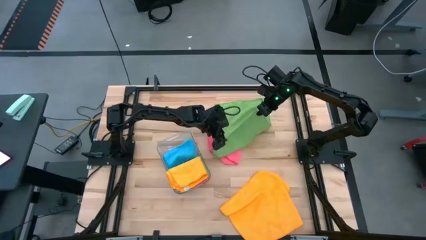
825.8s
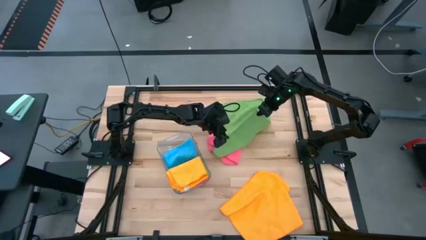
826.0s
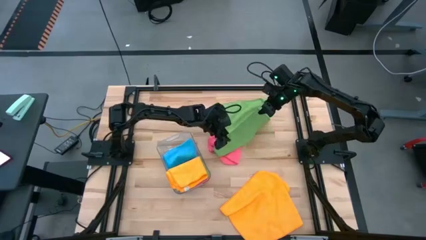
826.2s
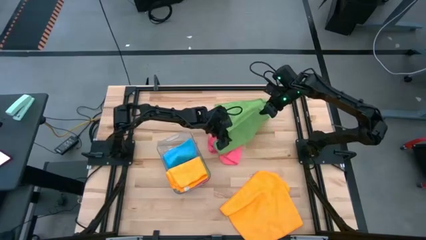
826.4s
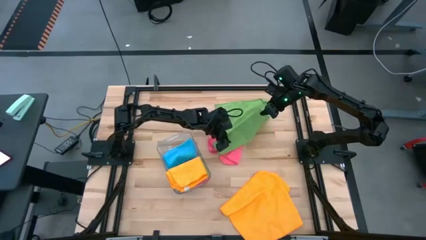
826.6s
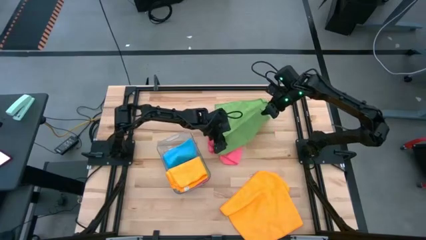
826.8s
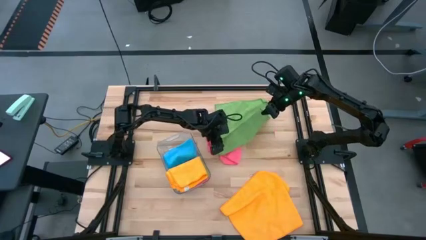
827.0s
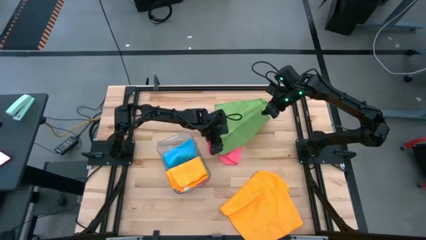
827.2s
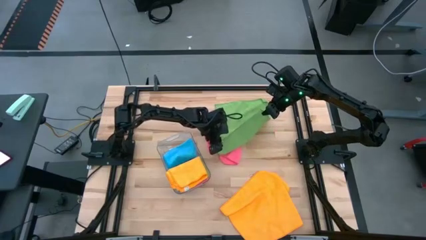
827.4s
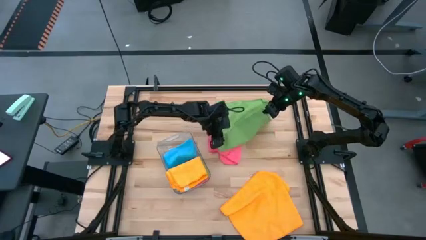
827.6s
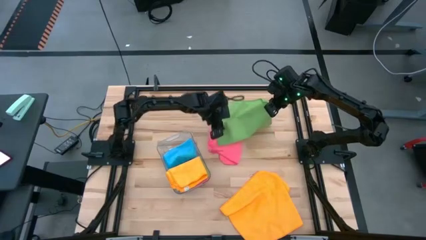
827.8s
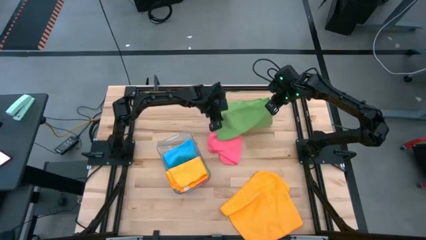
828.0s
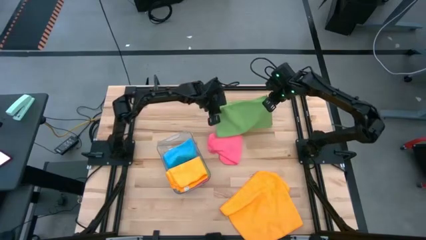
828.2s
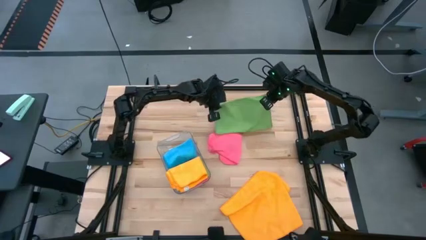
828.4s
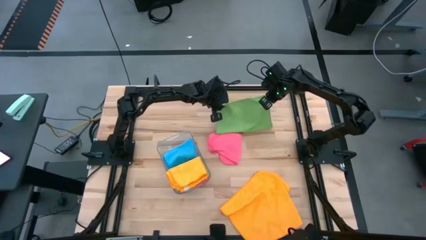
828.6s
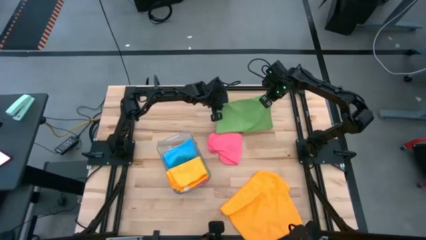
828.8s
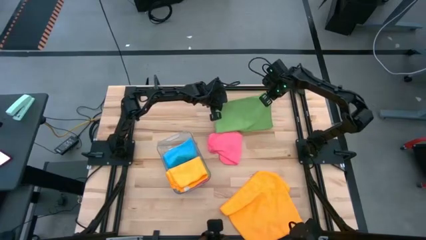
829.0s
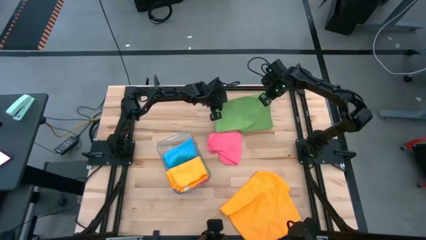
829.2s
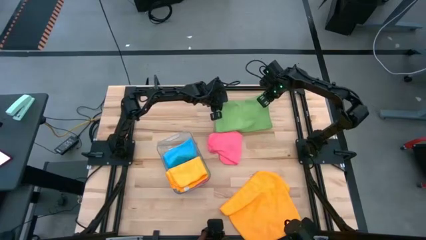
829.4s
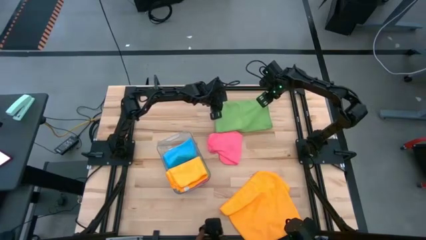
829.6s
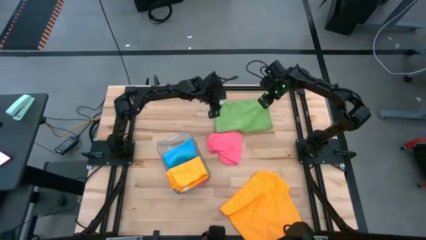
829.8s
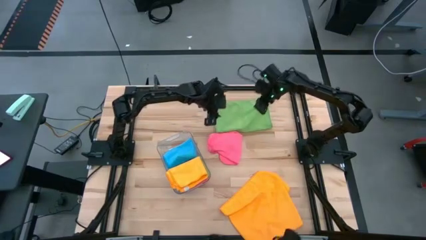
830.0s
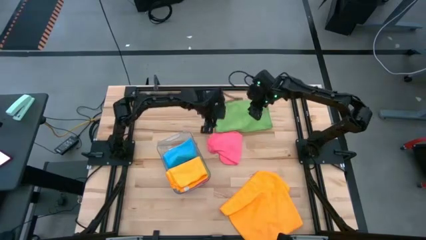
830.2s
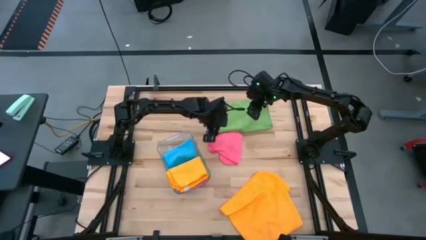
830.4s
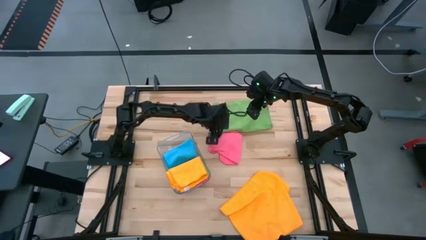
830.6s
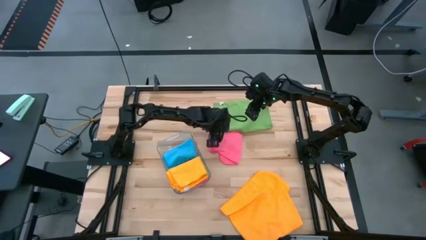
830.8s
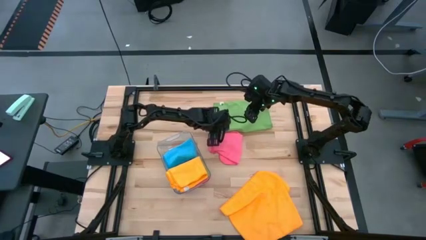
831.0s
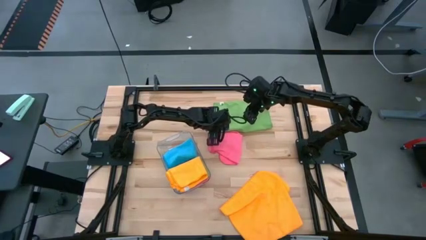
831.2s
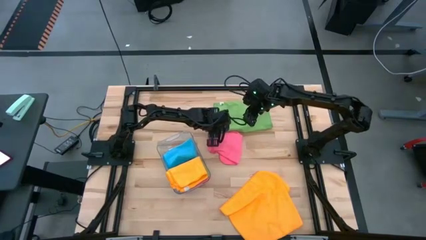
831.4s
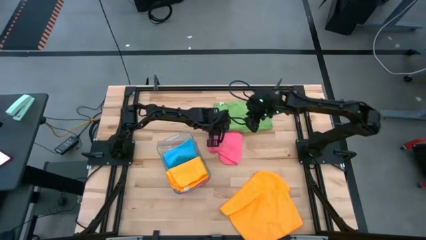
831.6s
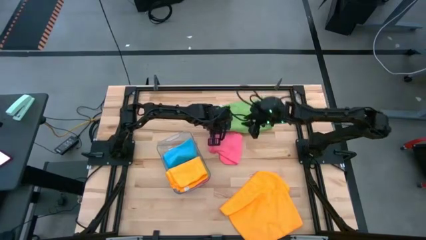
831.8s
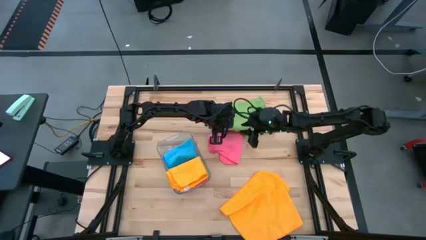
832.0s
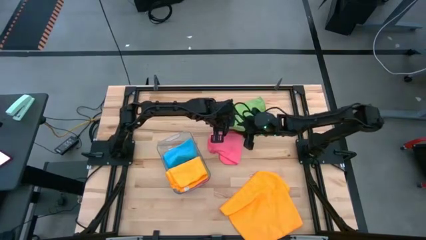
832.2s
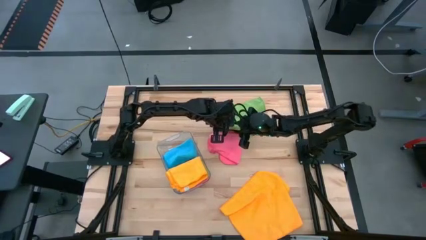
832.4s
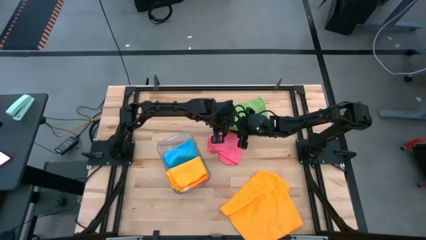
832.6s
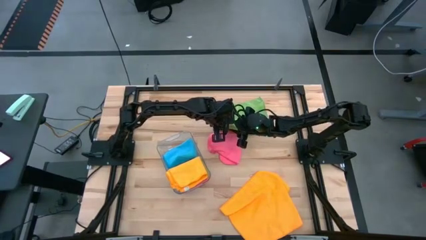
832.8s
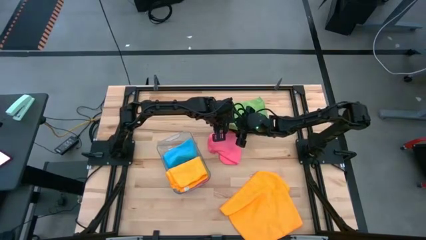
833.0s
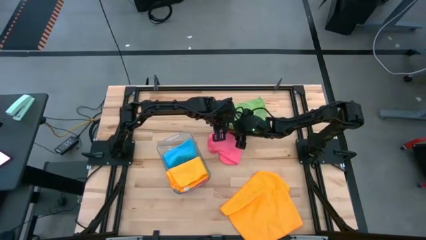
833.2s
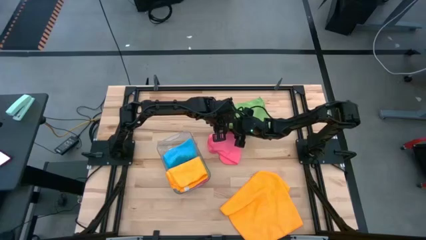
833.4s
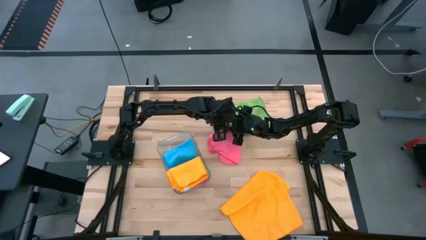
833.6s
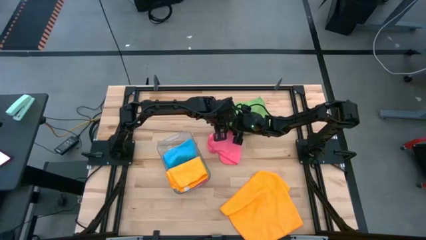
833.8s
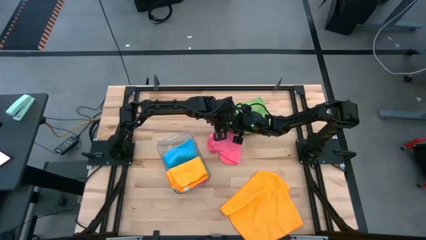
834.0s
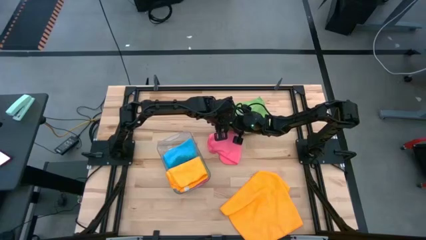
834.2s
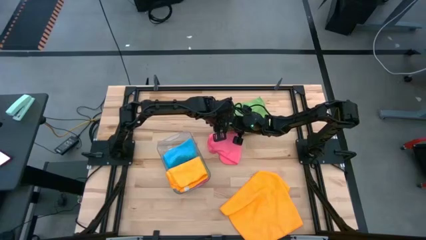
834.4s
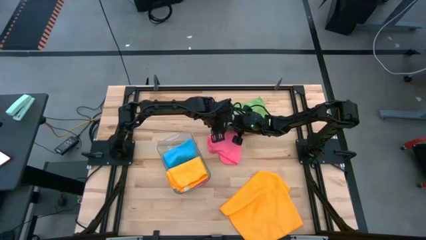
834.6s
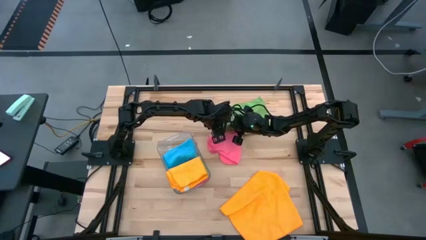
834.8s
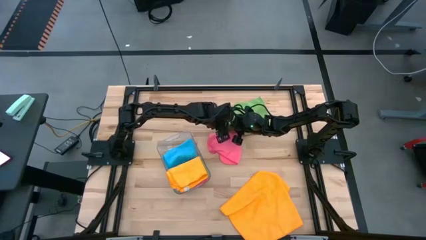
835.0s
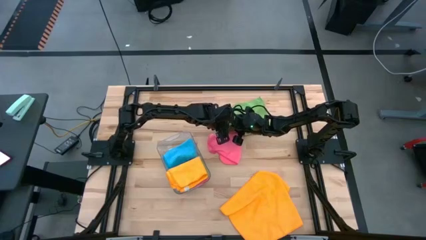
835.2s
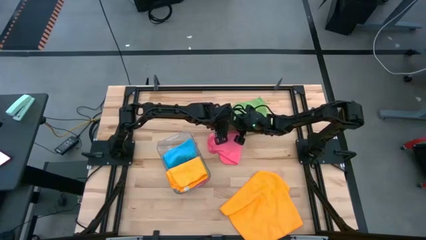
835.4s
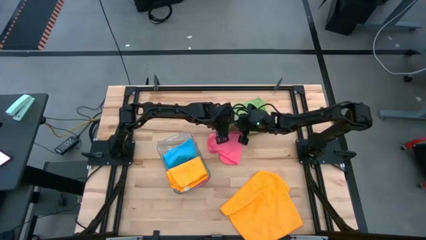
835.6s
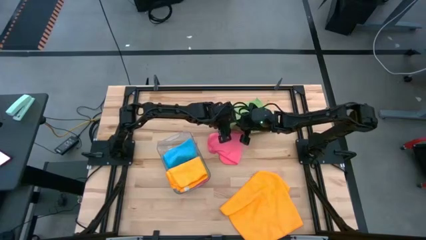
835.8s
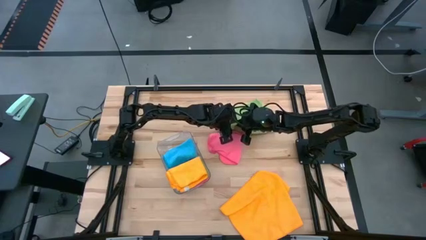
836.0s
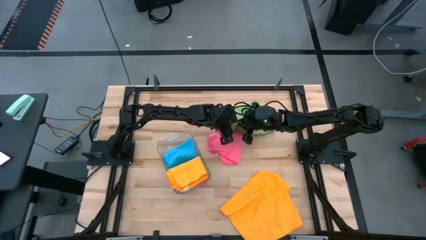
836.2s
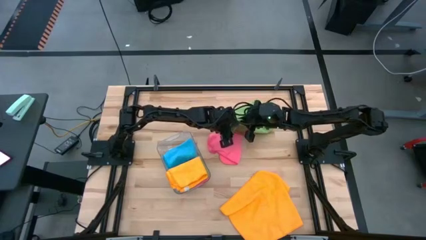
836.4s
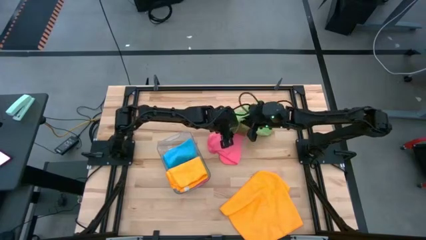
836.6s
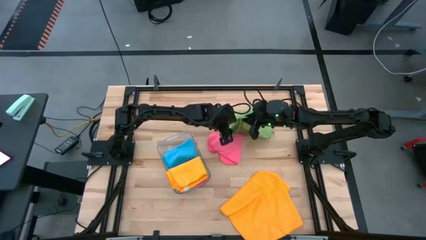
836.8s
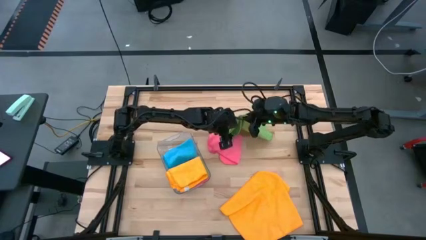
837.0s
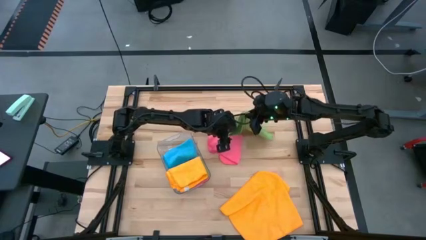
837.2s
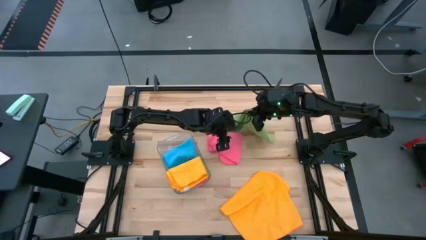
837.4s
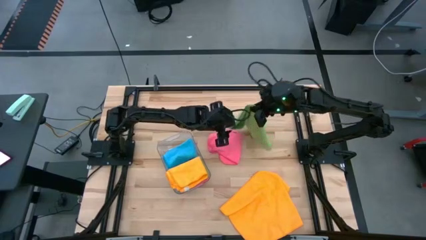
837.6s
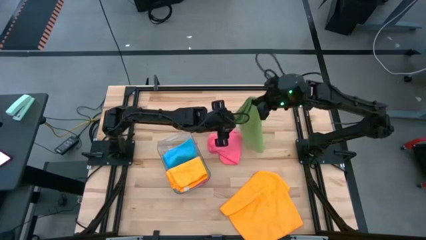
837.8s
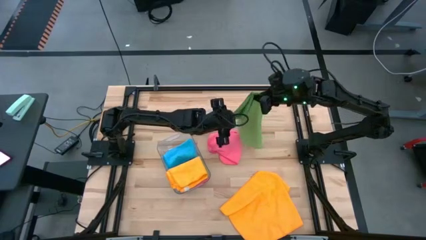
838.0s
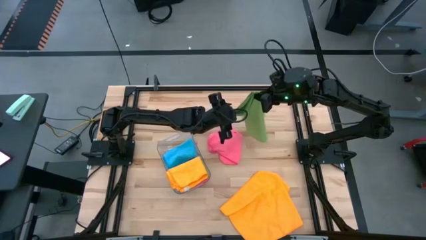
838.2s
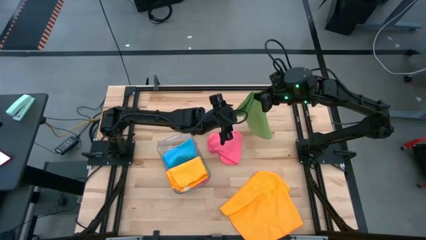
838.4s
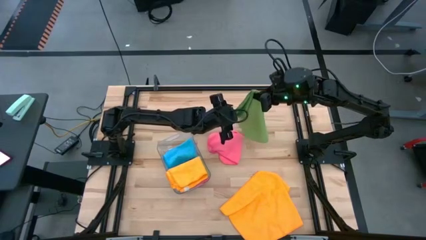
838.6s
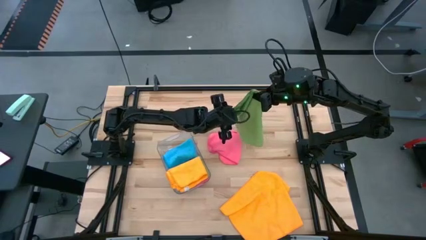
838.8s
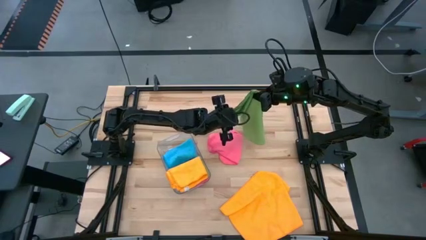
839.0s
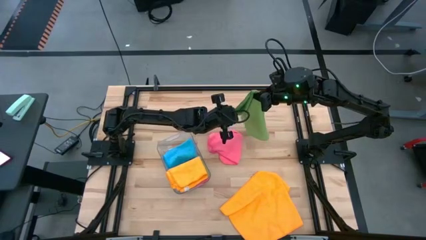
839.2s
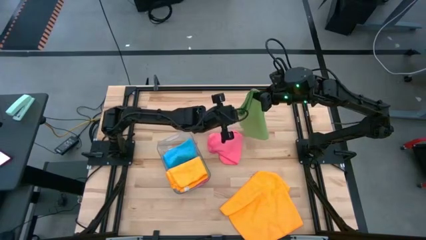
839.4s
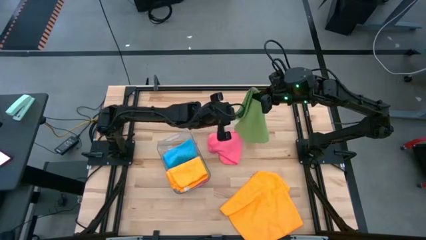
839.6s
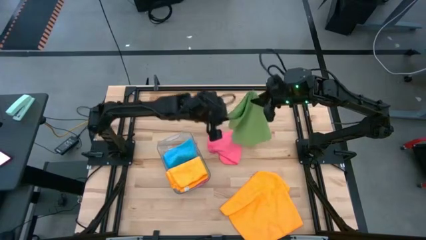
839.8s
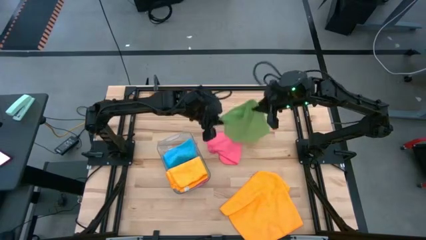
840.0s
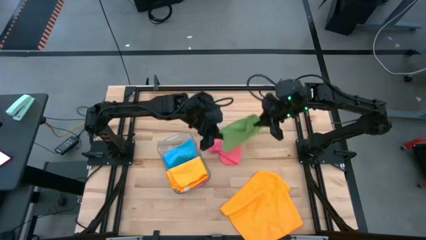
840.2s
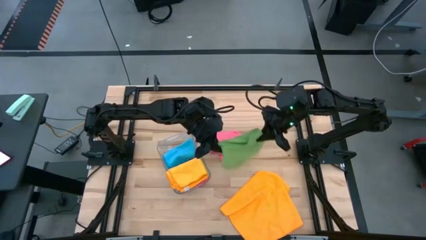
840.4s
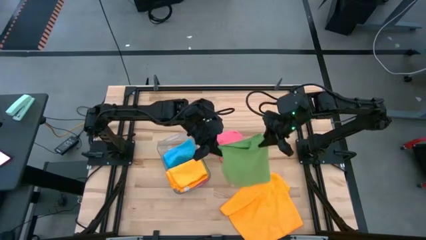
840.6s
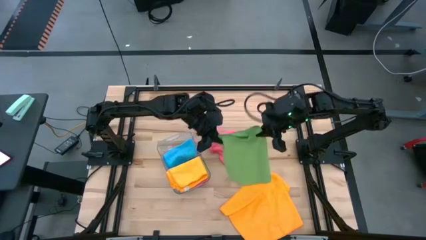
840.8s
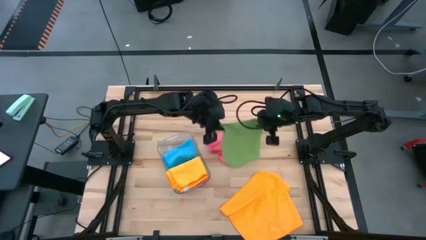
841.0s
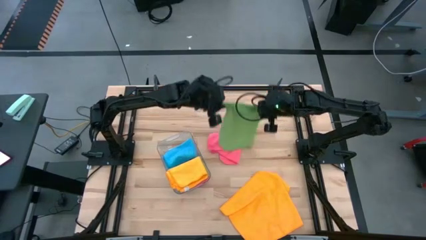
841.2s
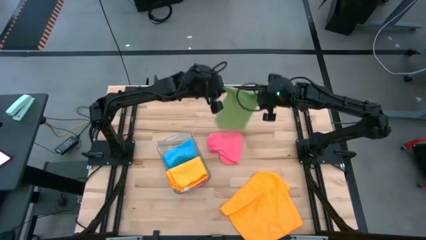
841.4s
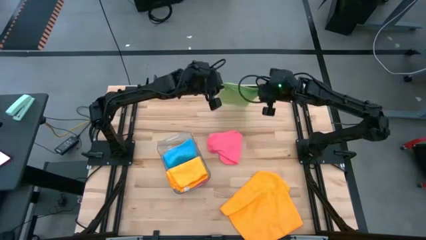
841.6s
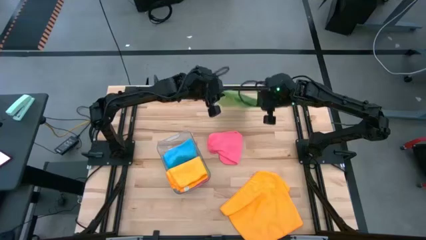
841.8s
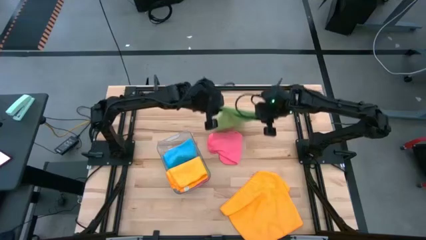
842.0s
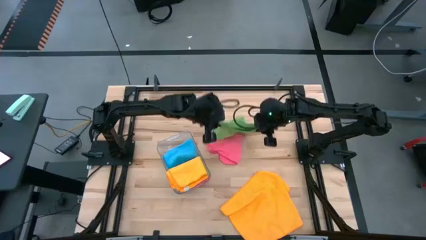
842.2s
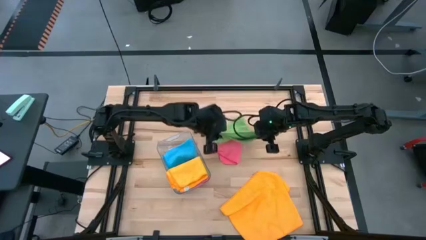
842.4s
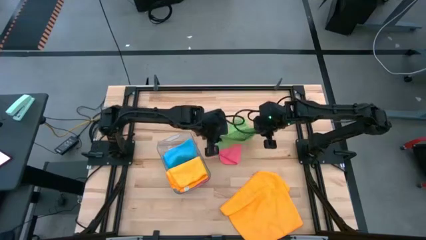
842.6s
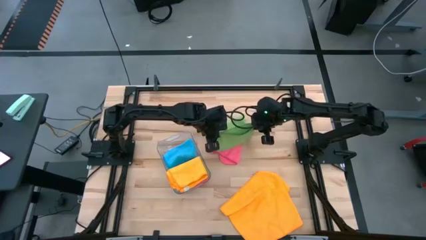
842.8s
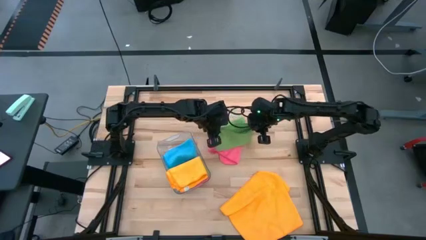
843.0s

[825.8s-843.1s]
Task: Fold microfiber towels
Fold the green towel
